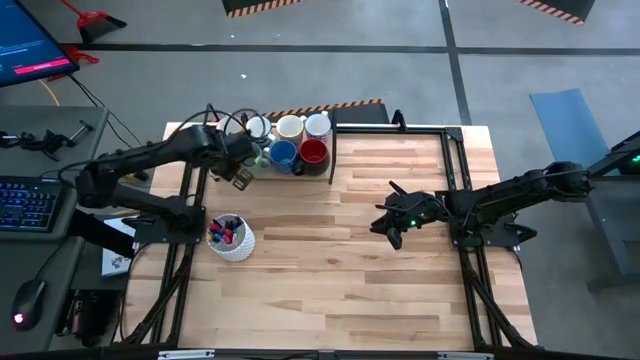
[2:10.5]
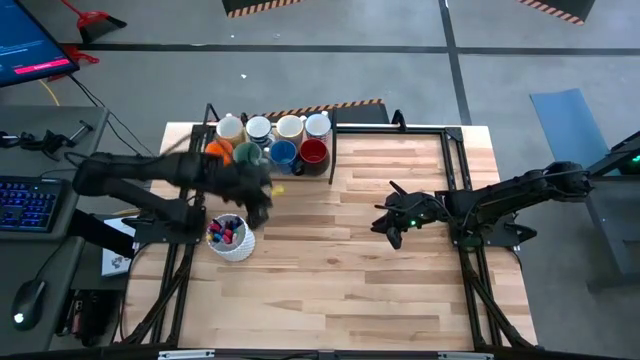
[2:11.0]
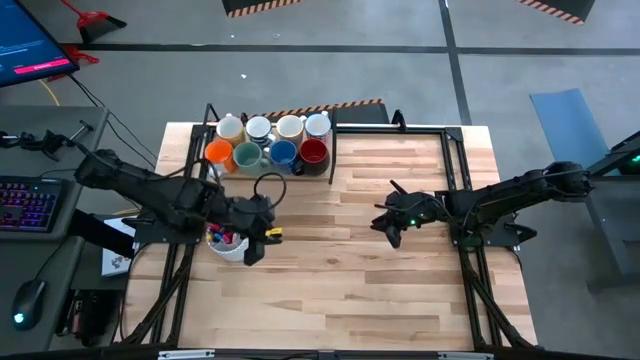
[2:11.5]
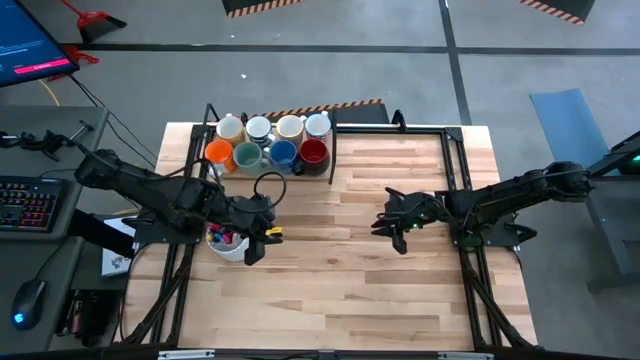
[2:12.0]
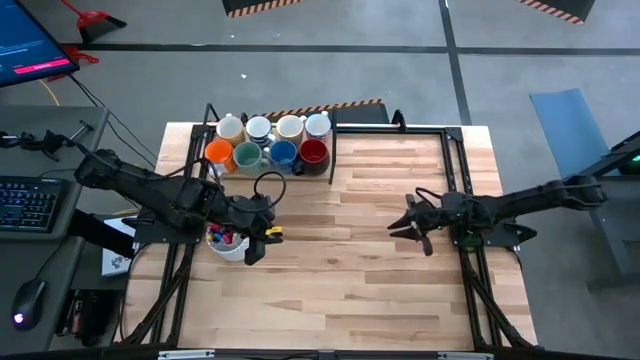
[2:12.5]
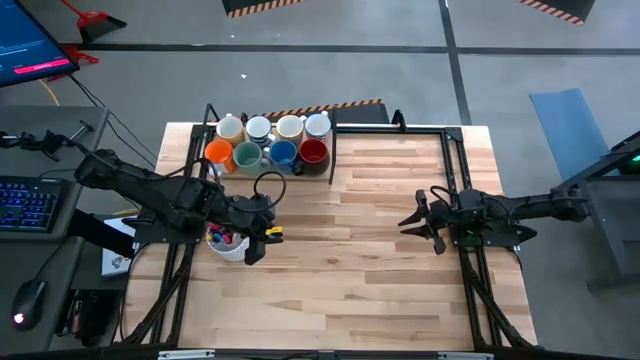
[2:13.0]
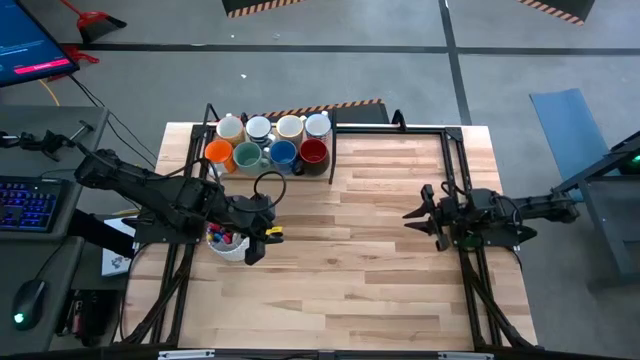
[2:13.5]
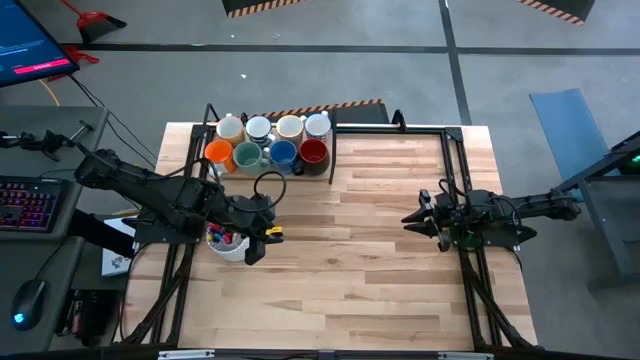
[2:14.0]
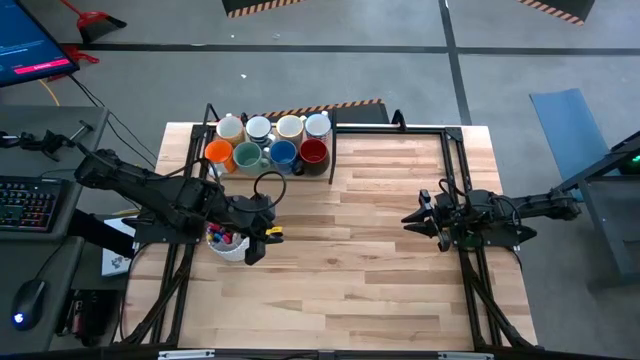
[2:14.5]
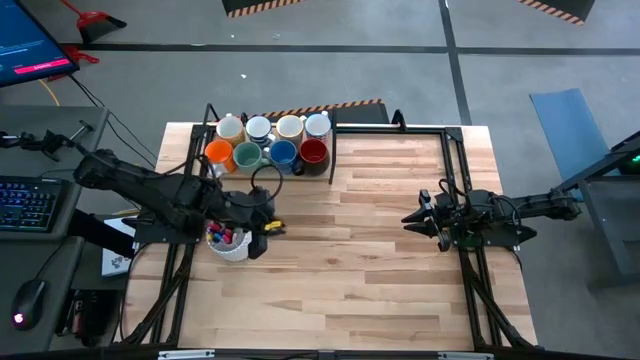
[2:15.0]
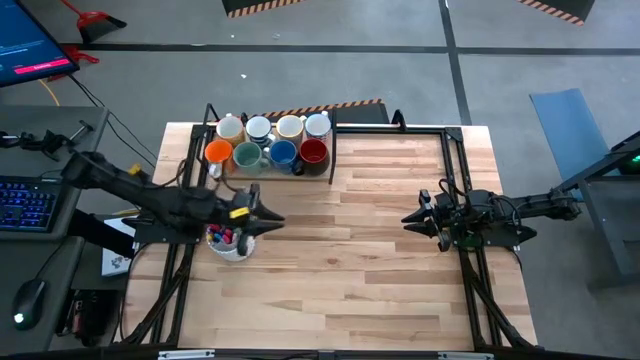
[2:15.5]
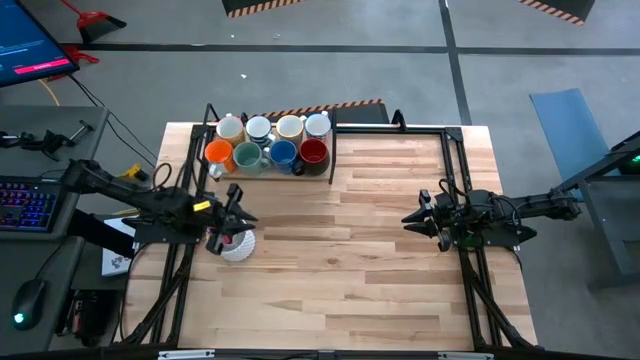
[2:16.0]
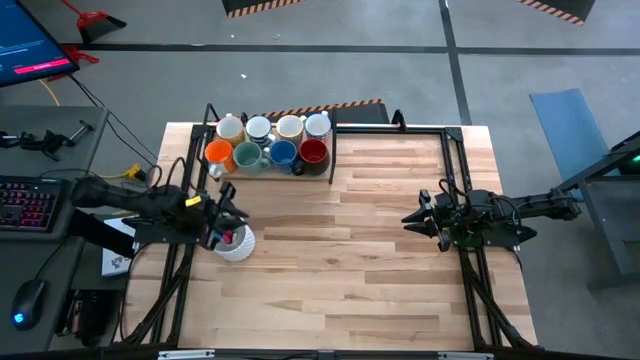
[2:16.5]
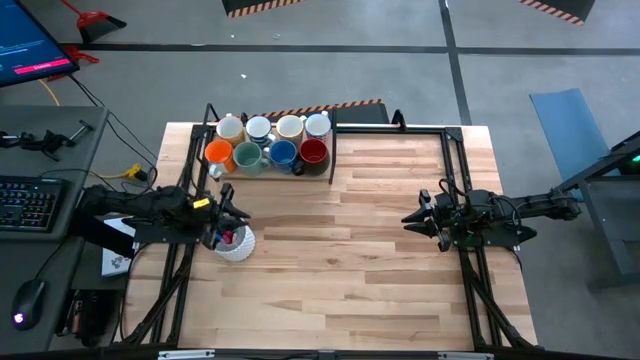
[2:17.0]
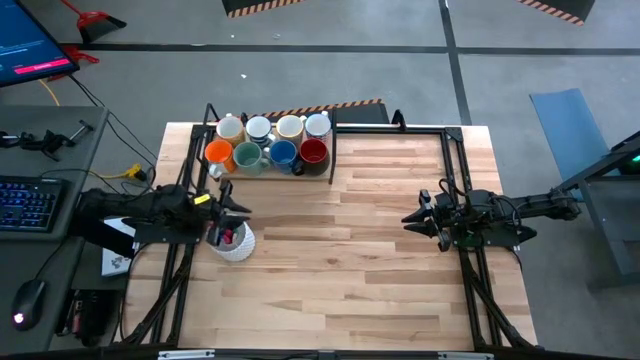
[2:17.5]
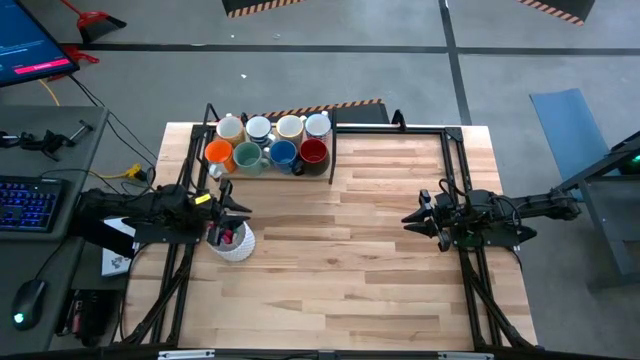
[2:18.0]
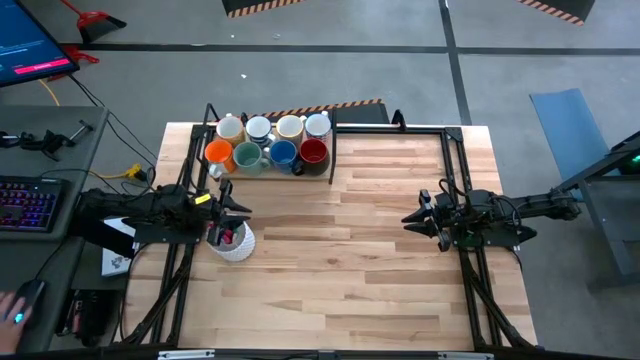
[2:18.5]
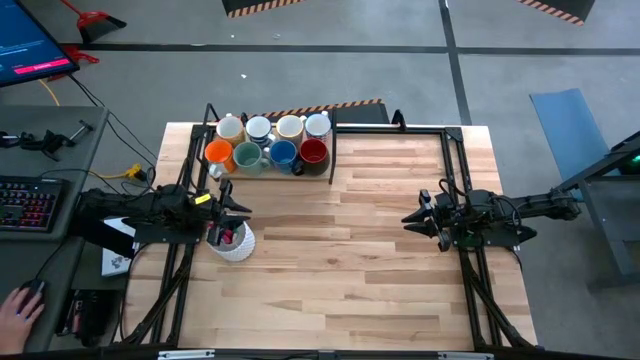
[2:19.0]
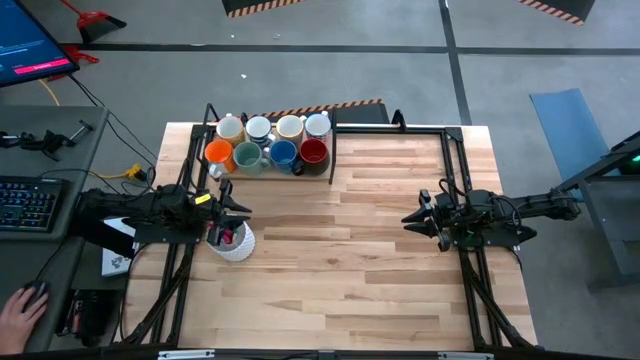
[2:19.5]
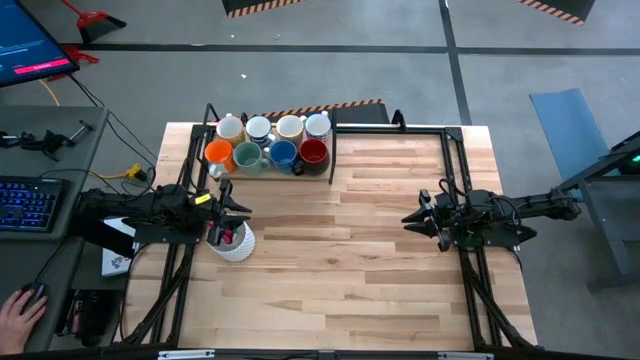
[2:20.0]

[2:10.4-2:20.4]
Task: Place coffee mugs
Return to Home Position

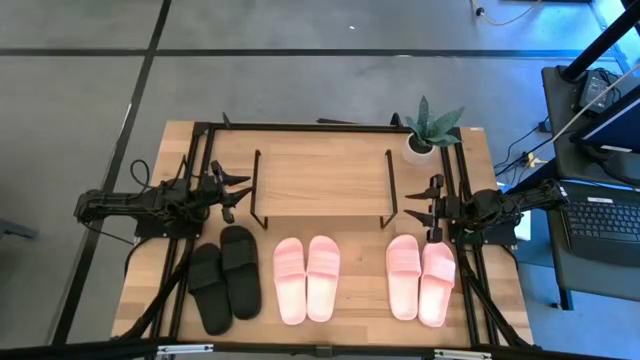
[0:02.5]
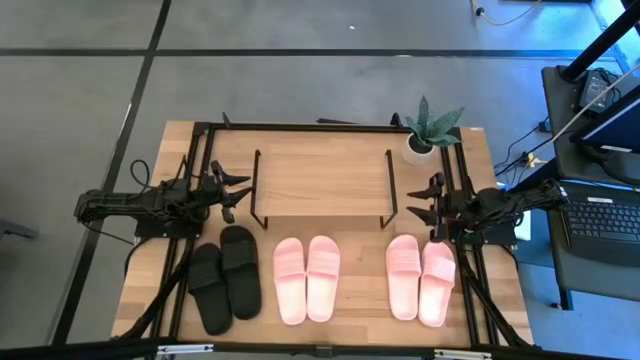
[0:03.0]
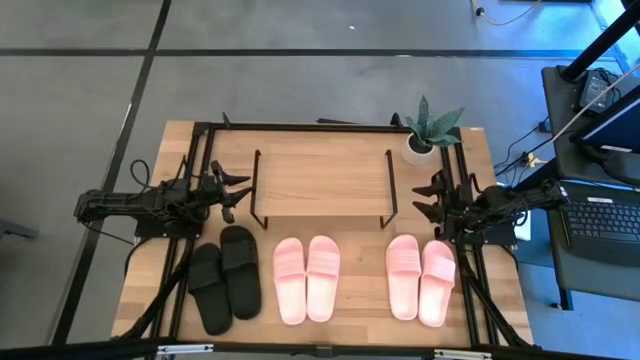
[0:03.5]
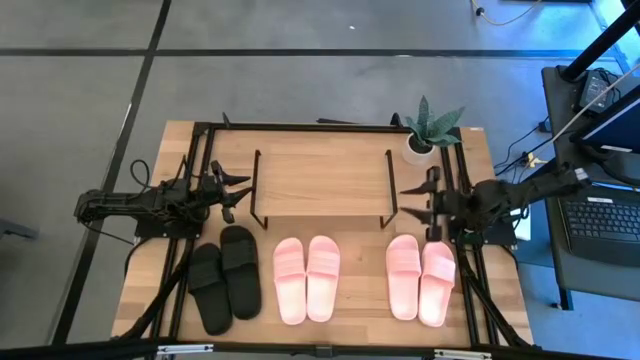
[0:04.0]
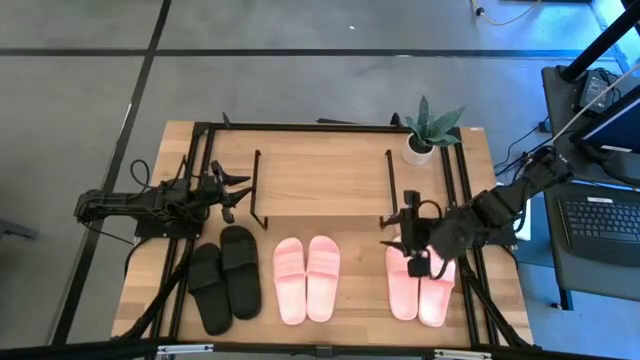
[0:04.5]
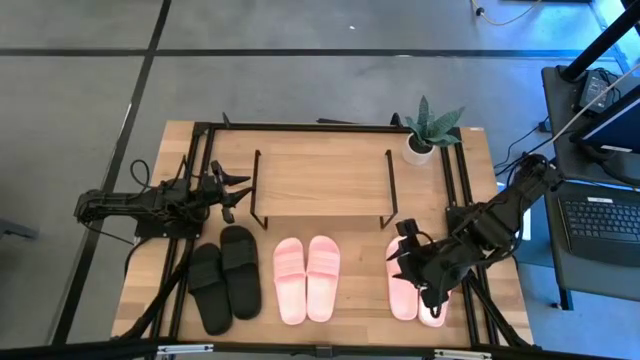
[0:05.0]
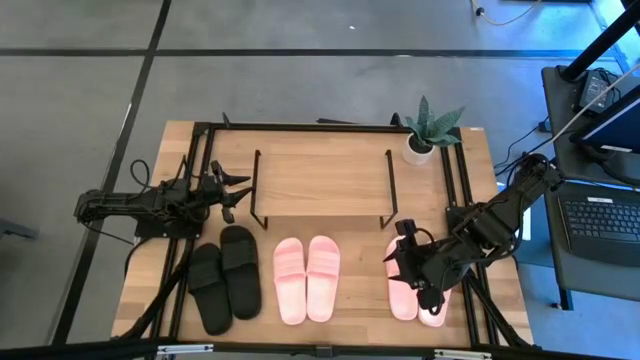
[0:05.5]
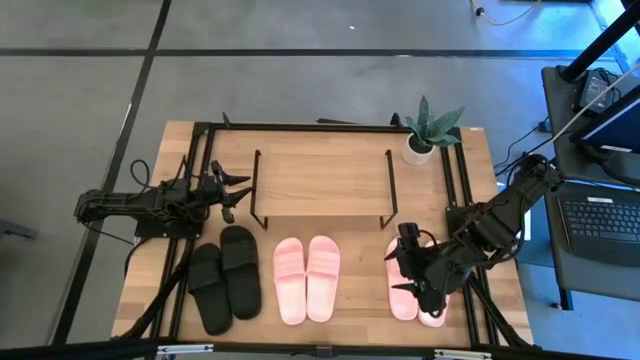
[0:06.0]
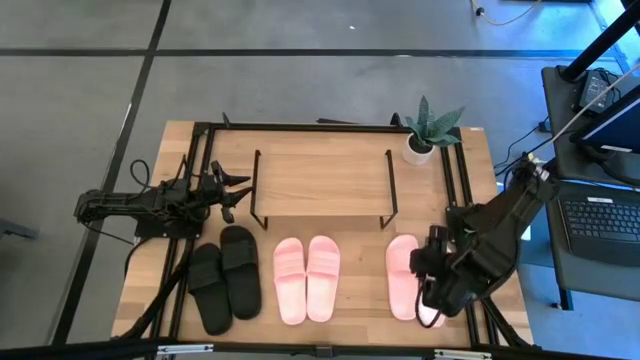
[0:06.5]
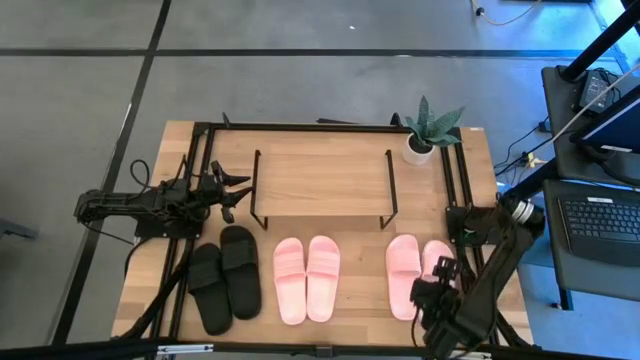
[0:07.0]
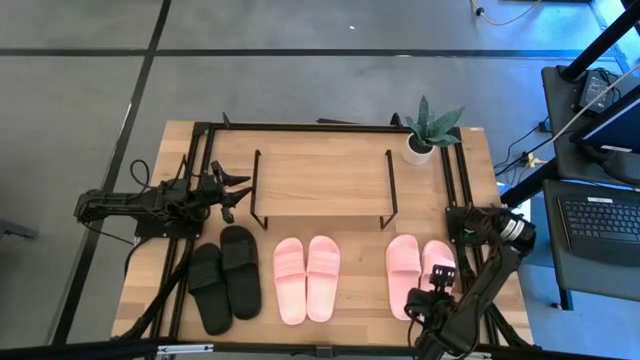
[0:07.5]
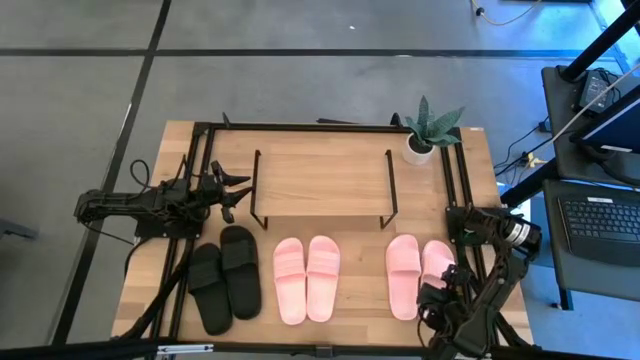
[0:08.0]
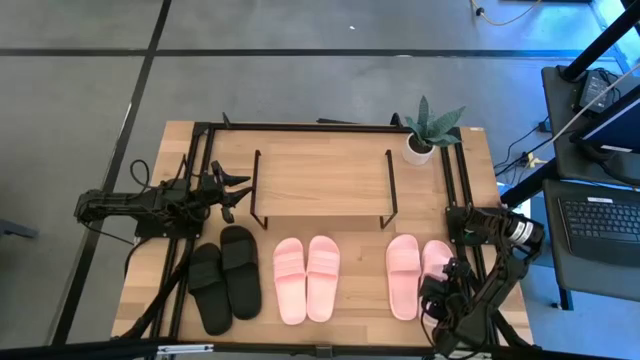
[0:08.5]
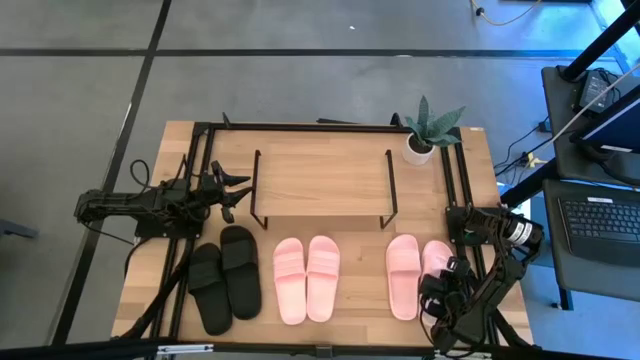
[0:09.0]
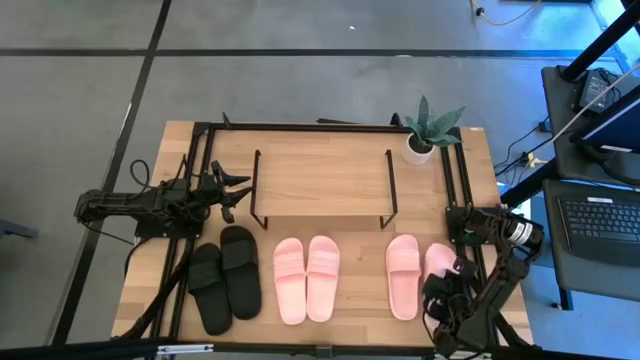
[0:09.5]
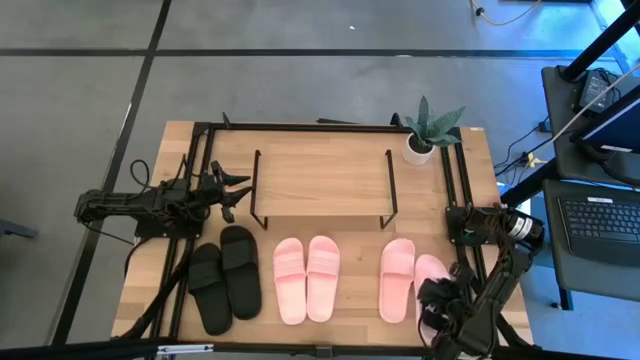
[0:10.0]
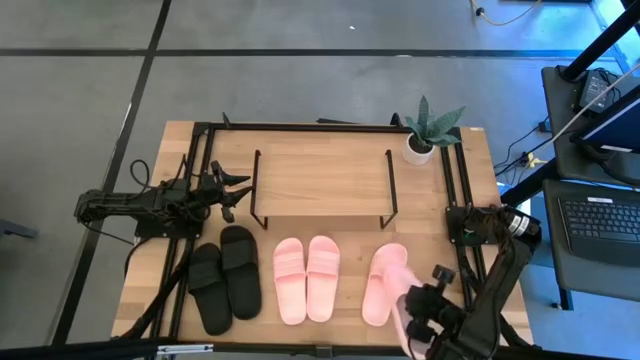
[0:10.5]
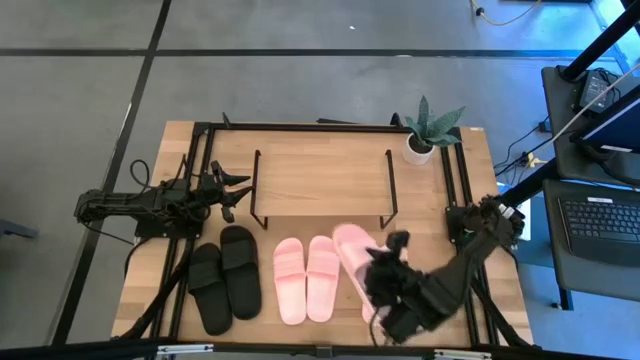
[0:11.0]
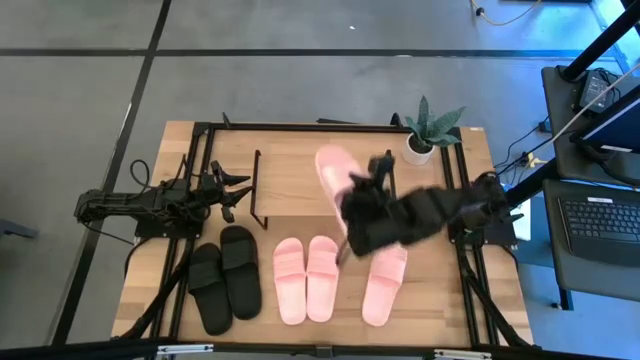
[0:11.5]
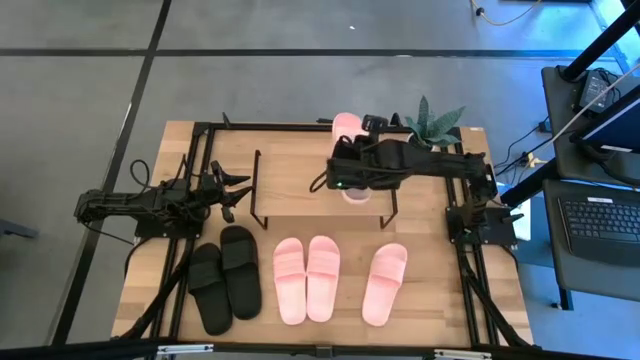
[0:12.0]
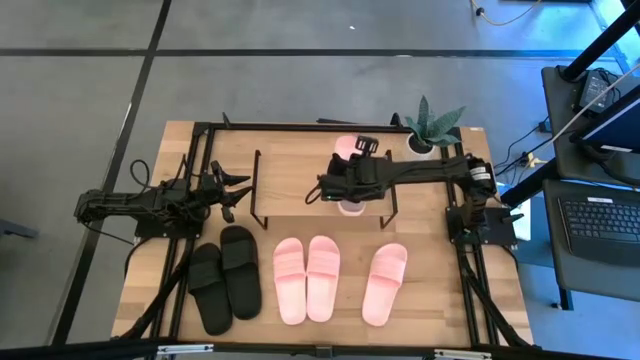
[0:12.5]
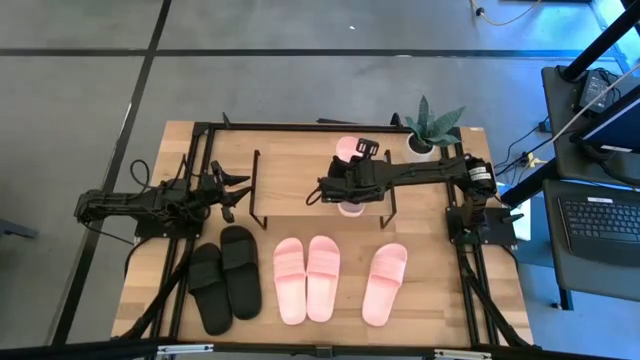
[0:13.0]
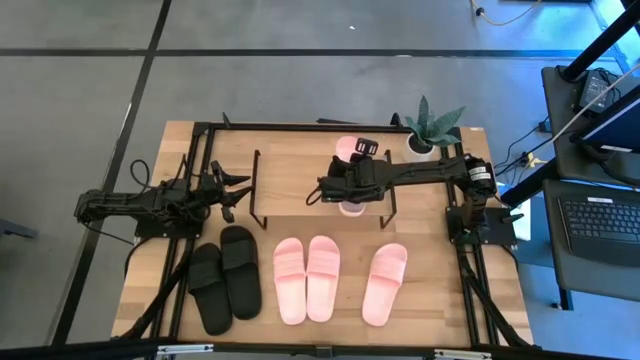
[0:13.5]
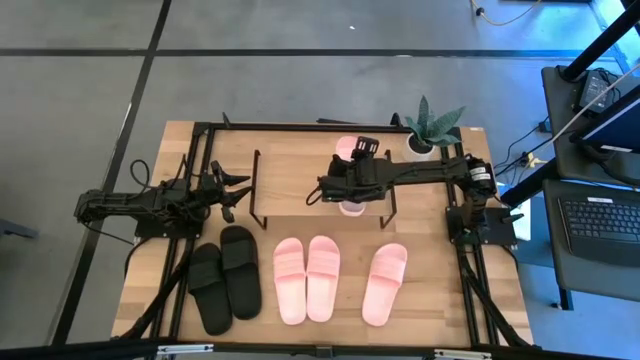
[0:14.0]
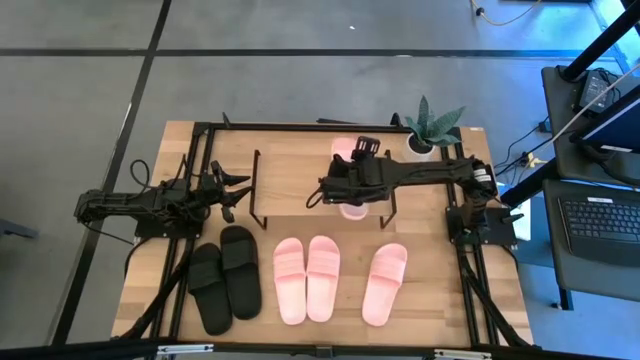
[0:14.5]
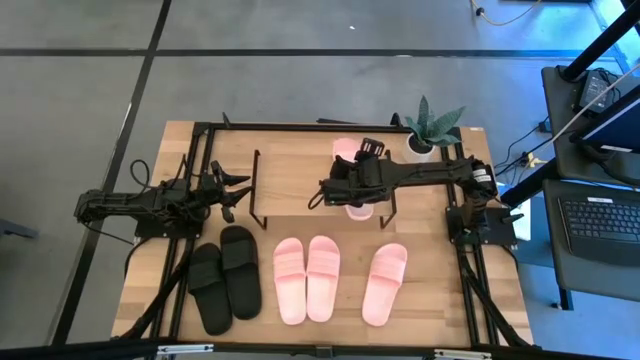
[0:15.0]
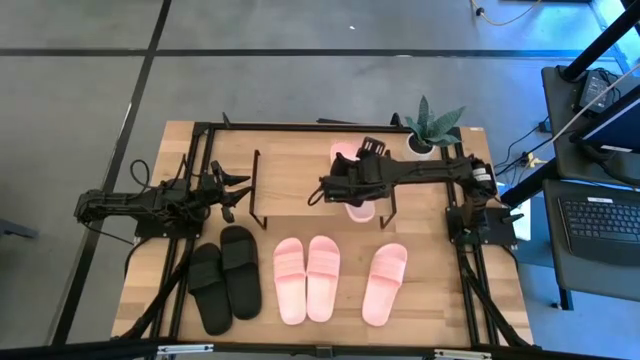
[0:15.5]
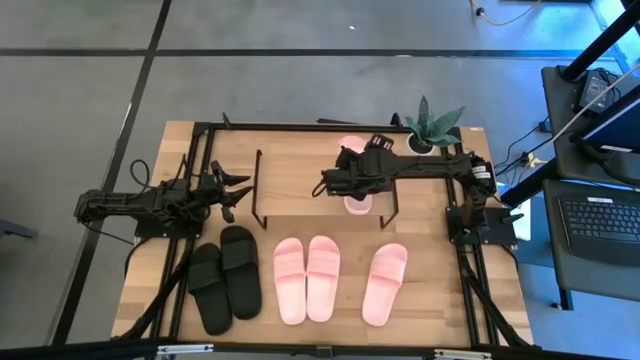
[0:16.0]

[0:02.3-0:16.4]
Task: Pick and place slides into the shelf
Put the pink slipper on the shelf
